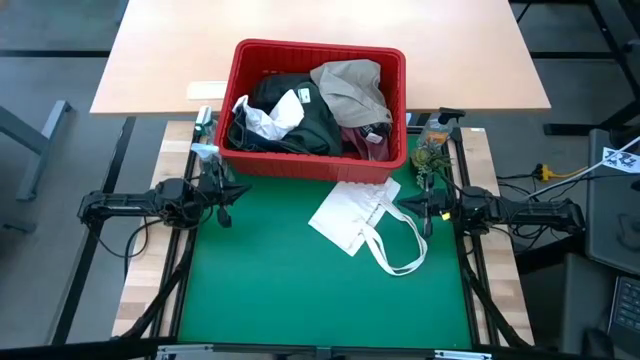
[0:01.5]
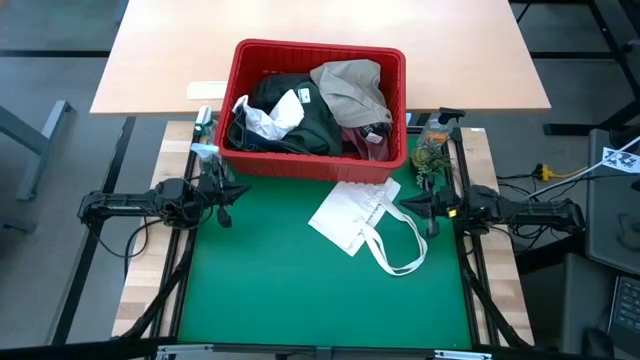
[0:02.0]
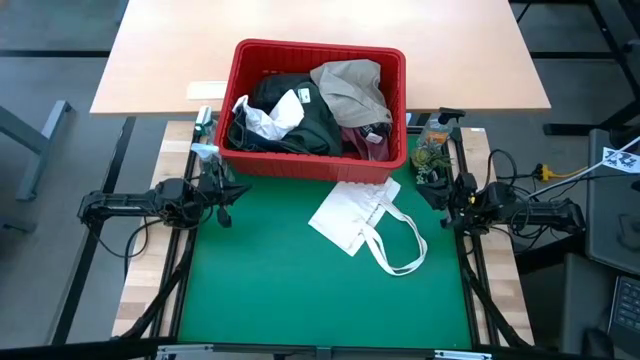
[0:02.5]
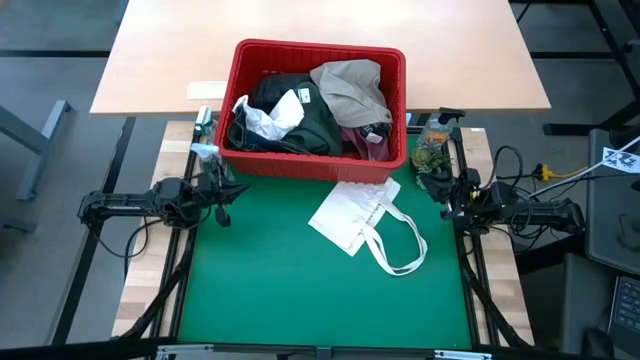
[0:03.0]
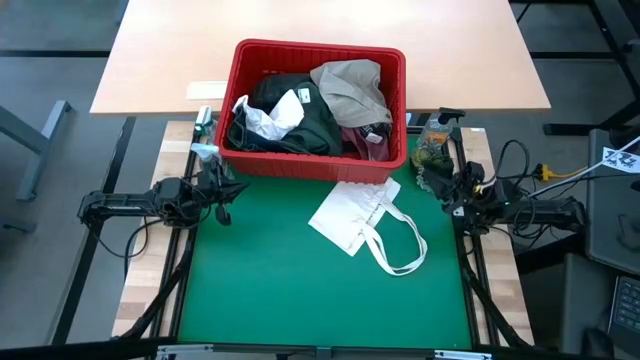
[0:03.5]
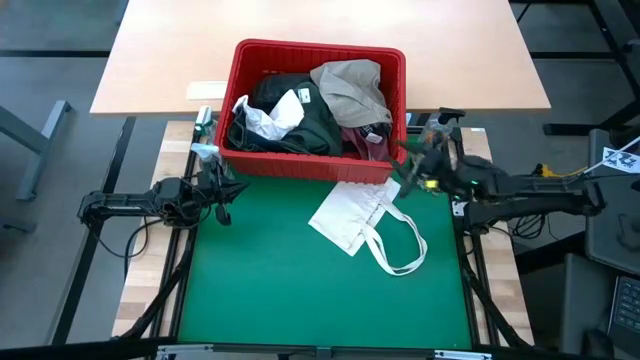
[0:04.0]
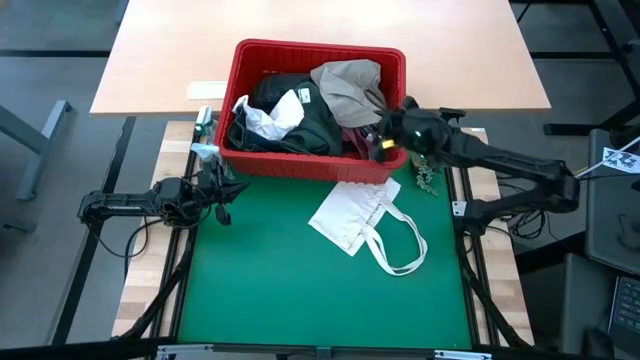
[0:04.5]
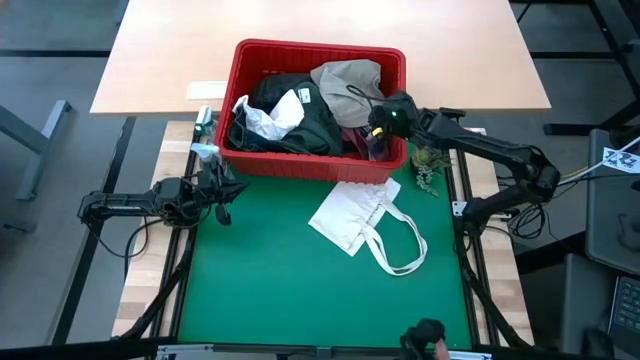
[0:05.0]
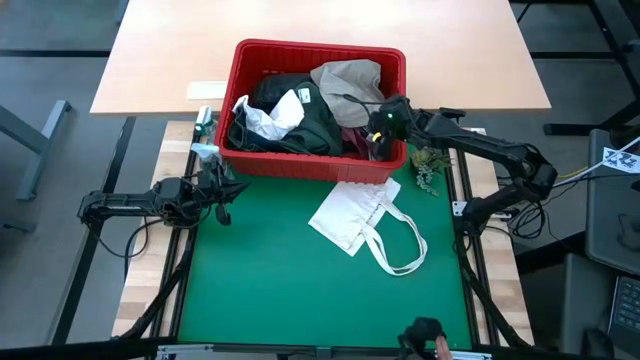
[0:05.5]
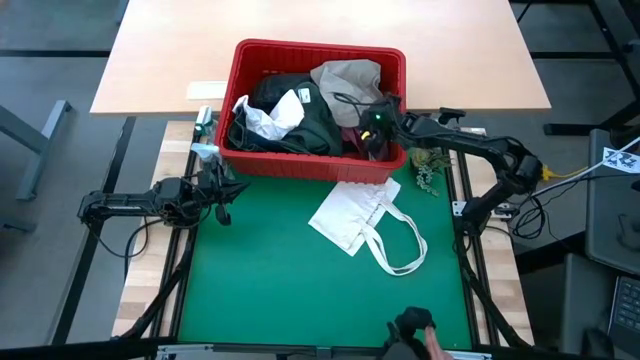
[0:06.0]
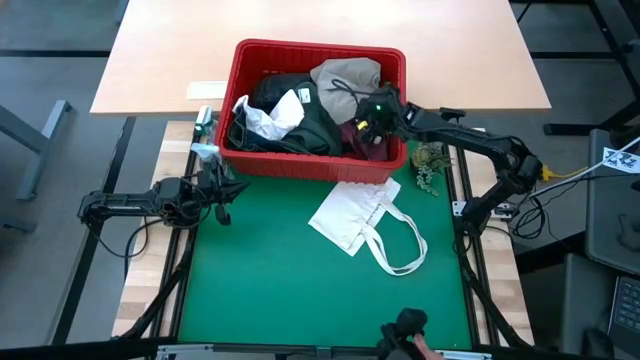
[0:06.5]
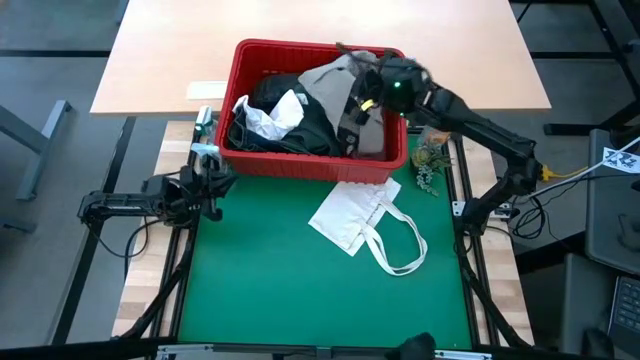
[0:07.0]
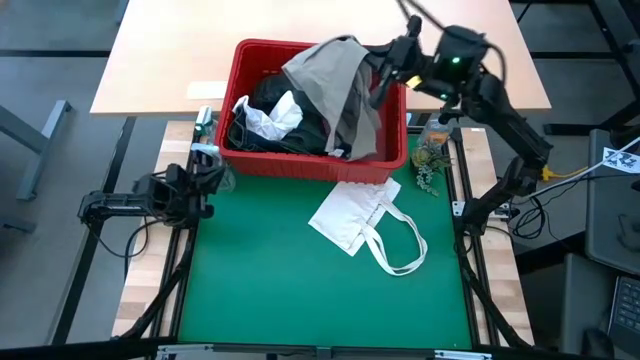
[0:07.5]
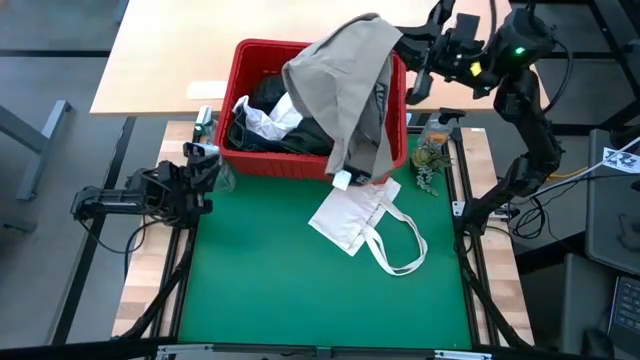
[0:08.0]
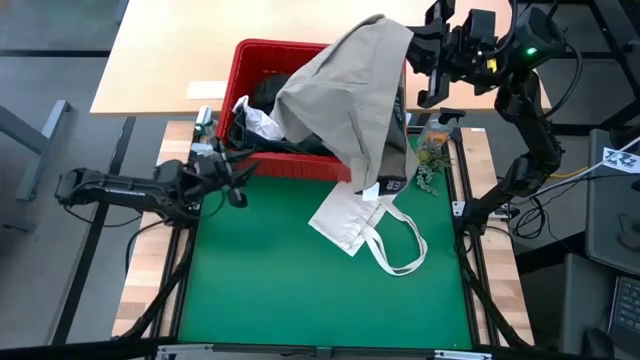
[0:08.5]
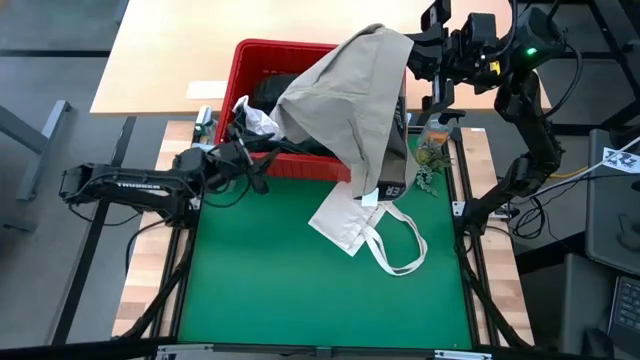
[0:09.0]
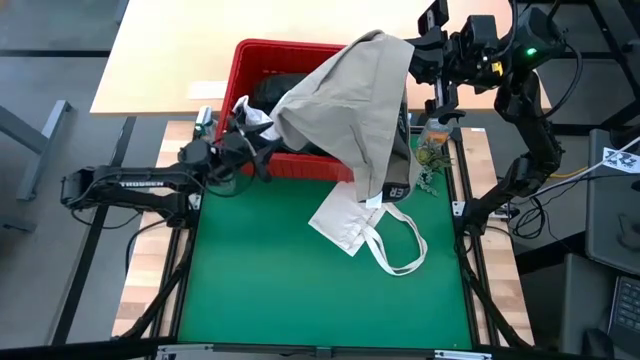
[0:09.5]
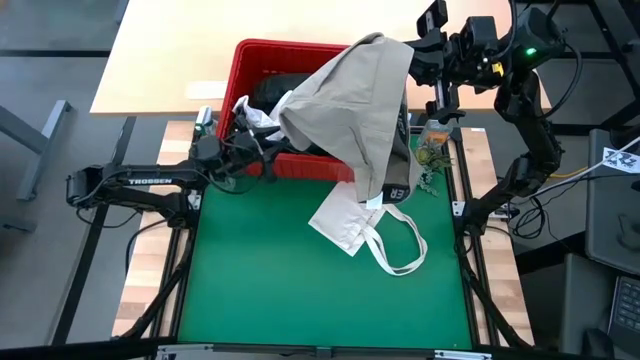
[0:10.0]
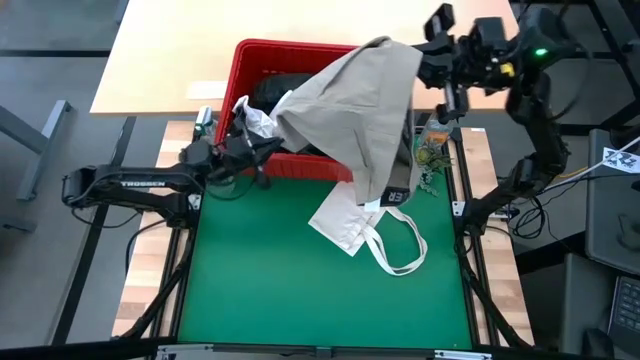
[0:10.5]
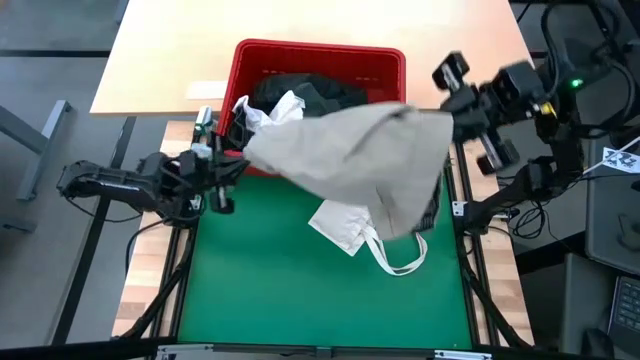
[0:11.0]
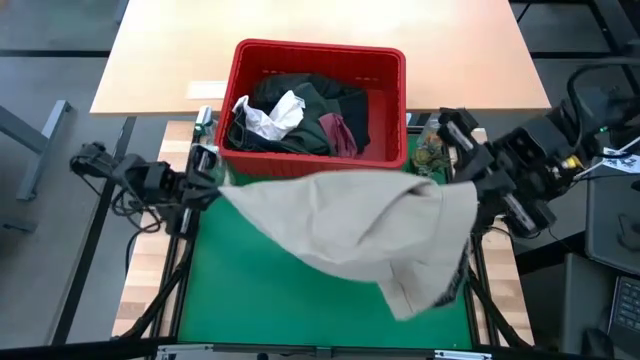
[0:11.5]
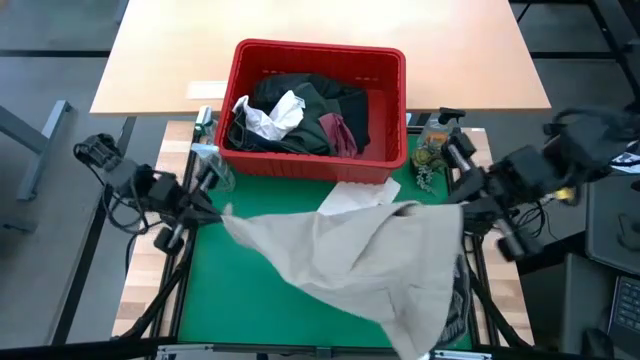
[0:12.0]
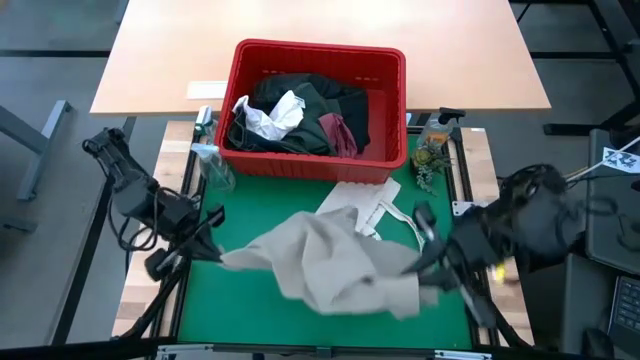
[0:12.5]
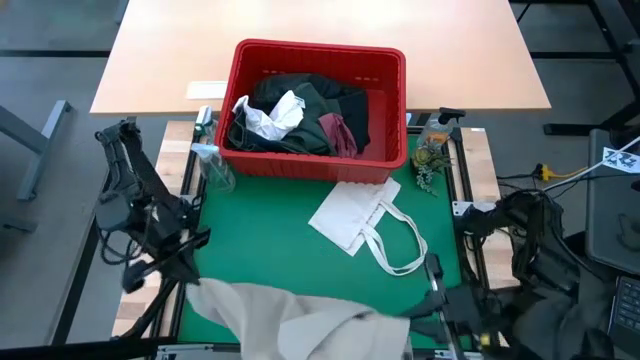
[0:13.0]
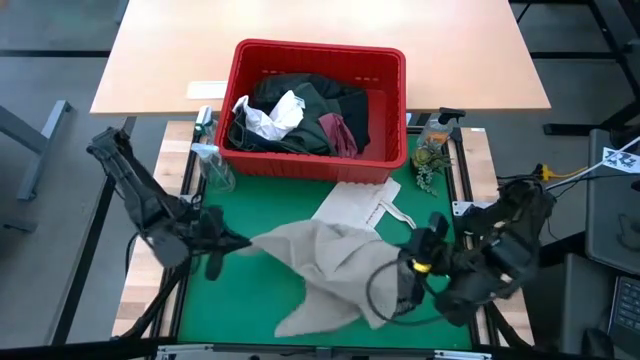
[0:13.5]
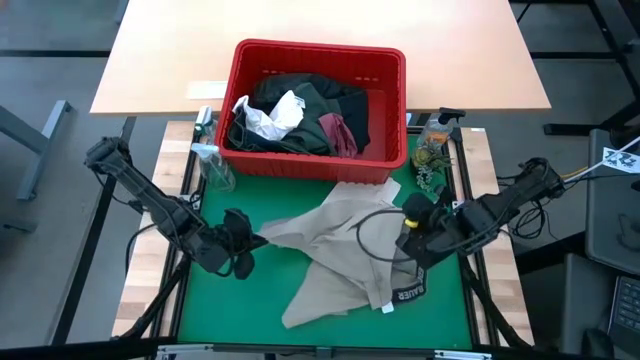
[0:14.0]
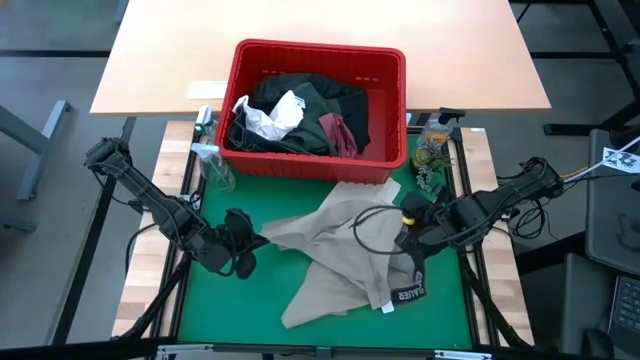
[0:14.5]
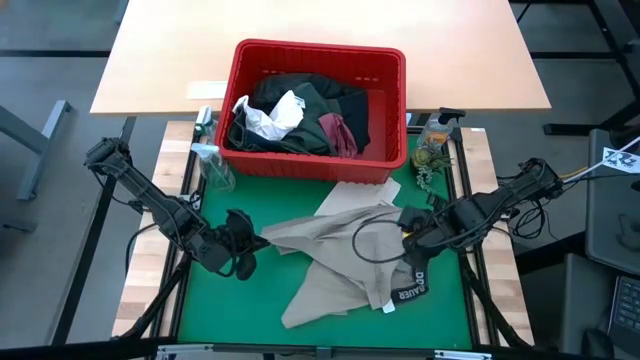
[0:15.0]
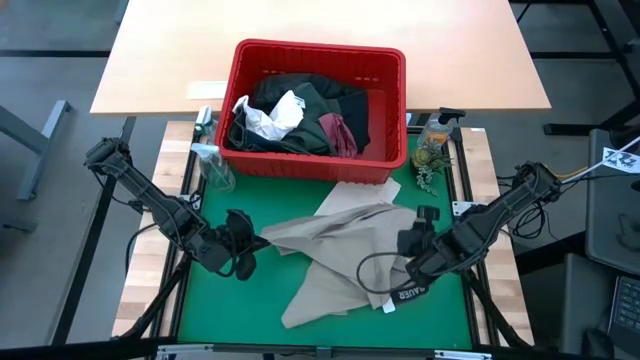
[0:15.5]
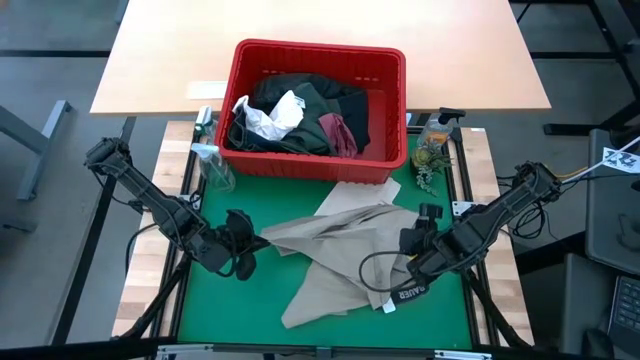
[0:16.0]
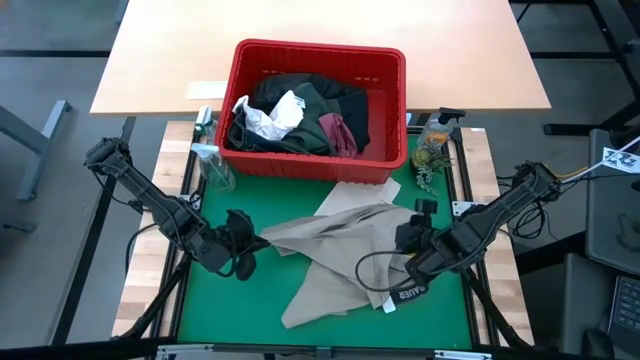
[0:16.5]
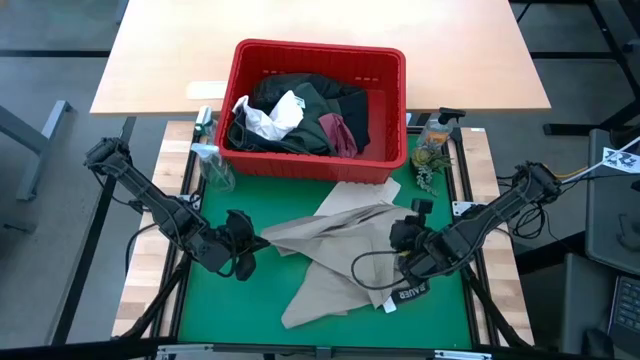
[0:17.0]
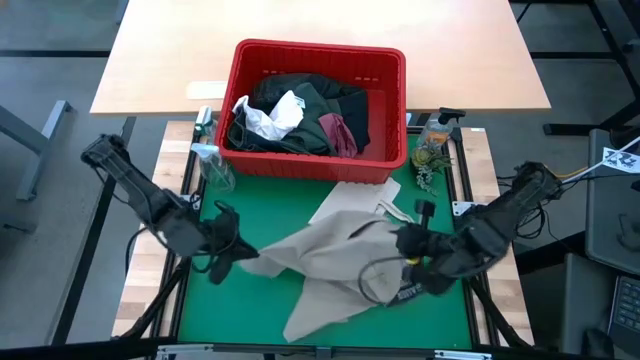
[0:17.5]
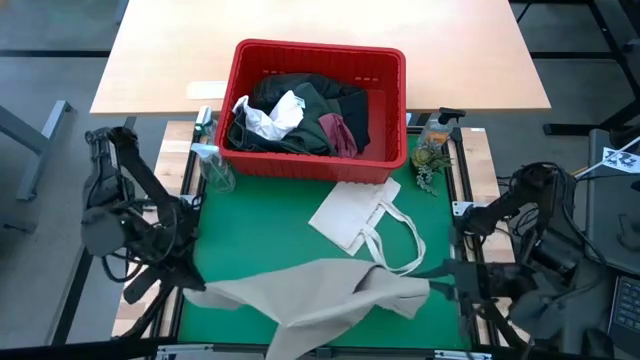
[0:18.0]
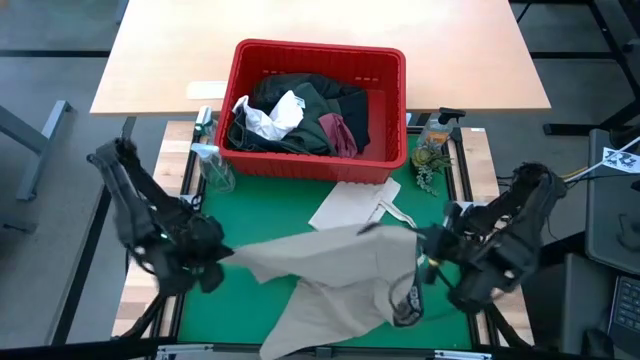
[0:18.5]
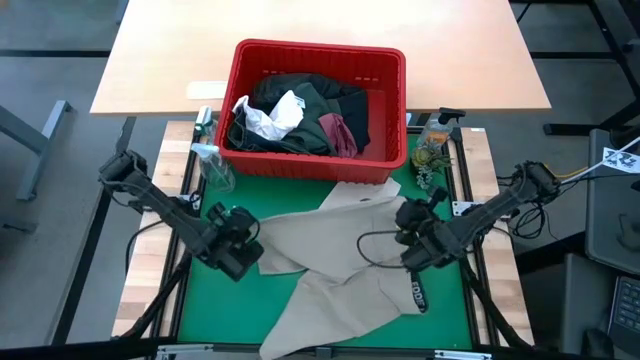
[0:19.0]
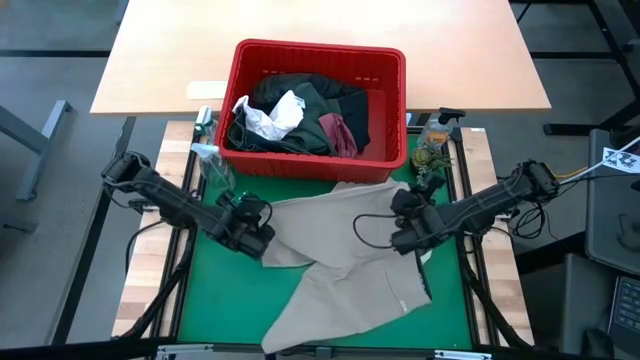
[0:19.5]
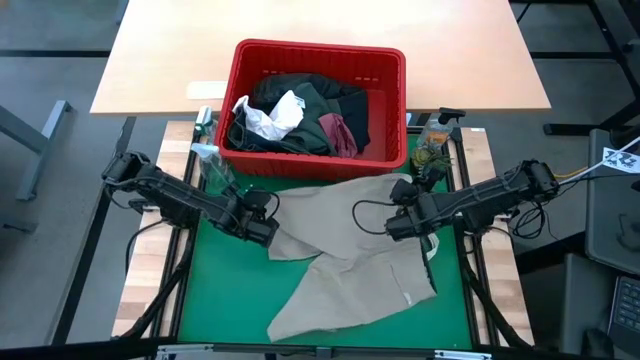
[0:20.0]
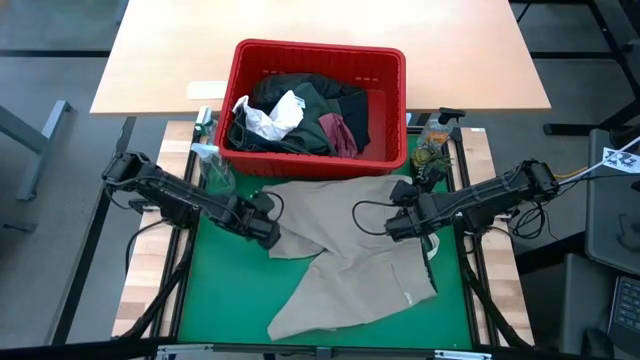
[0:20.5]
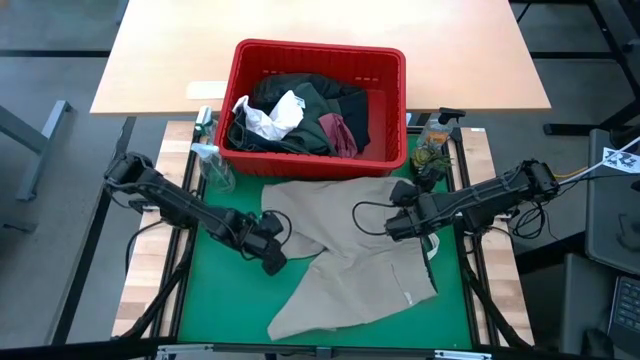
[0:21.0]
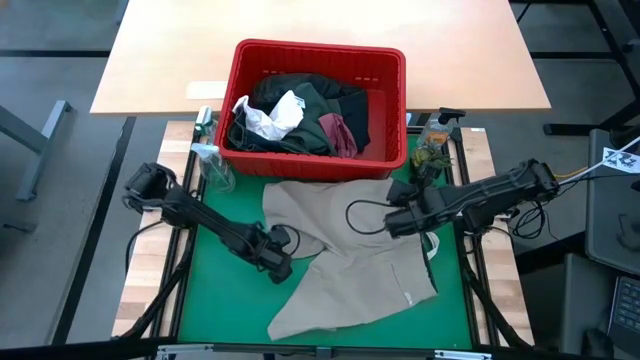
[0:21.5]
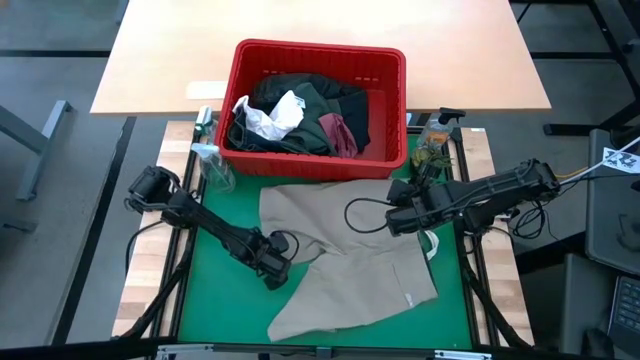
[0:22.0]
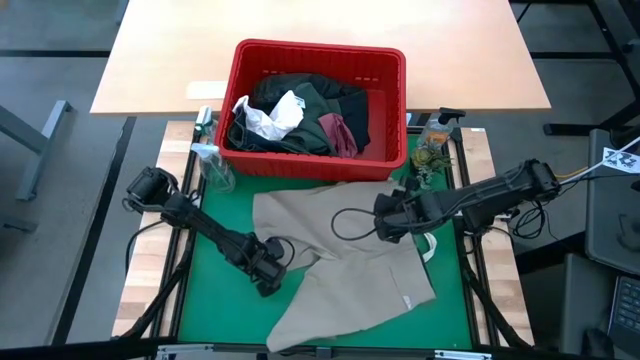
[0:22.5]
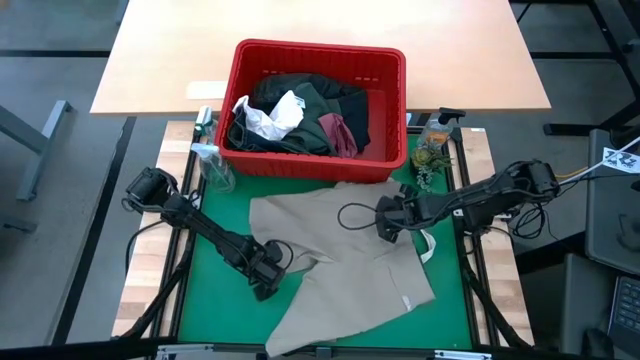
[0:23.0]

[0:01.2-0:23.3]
Task: Fold laundry
Fold the brown shorts
